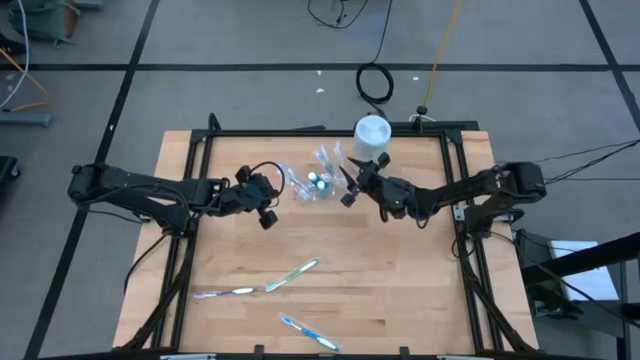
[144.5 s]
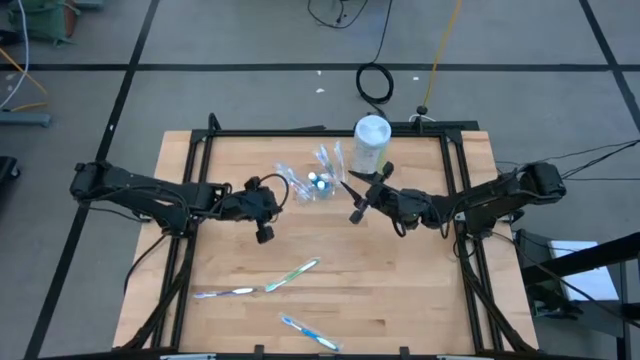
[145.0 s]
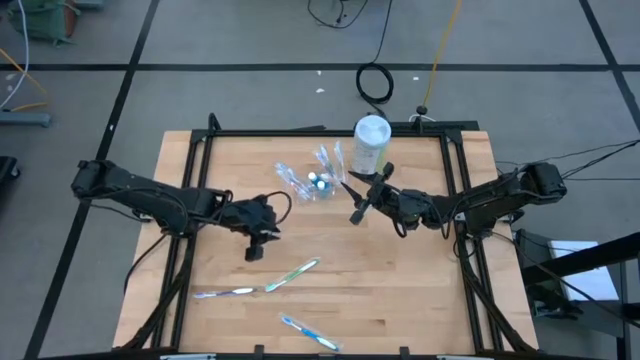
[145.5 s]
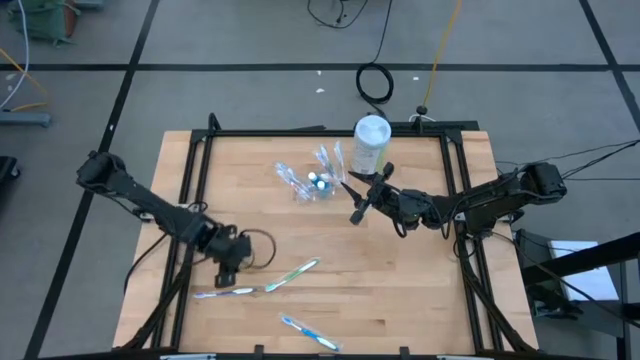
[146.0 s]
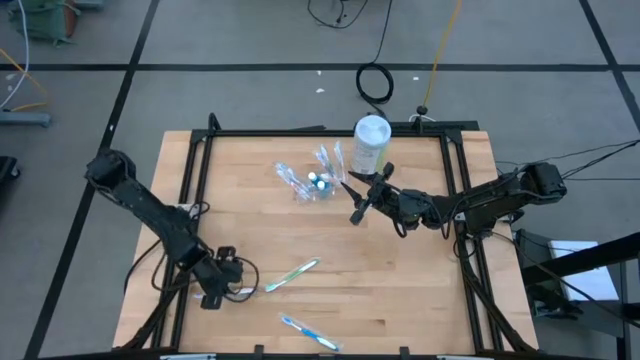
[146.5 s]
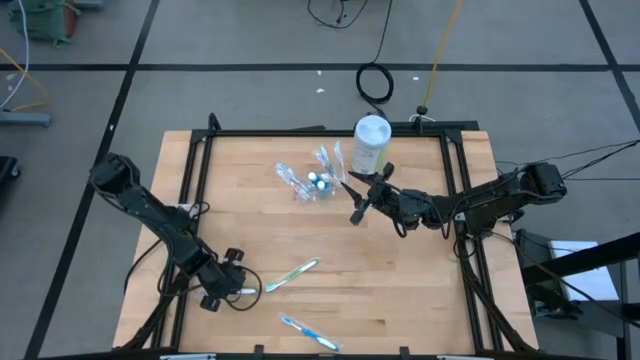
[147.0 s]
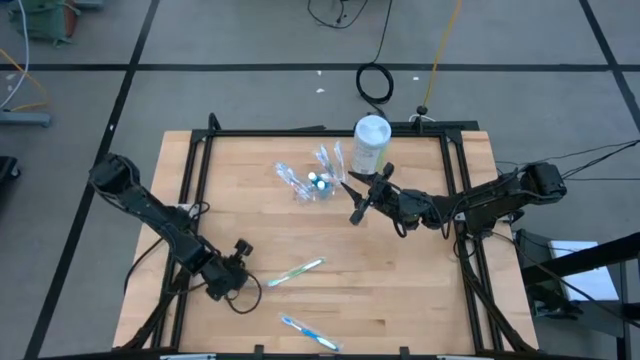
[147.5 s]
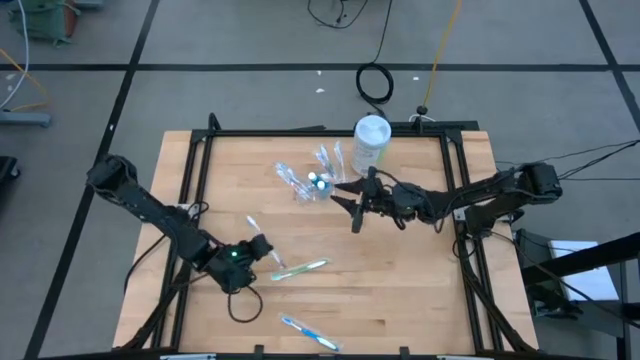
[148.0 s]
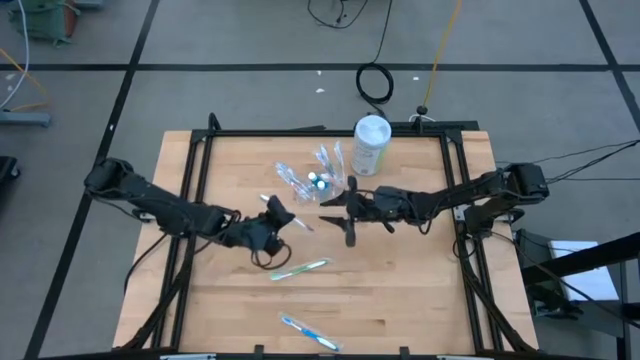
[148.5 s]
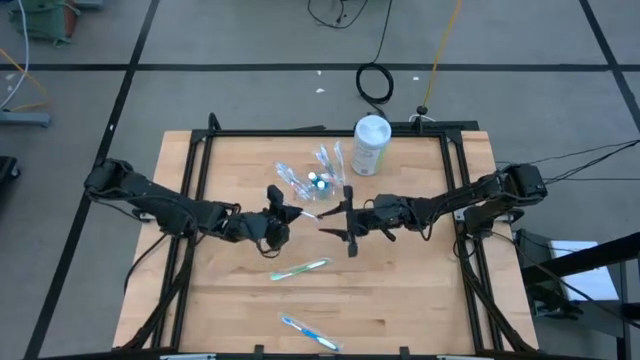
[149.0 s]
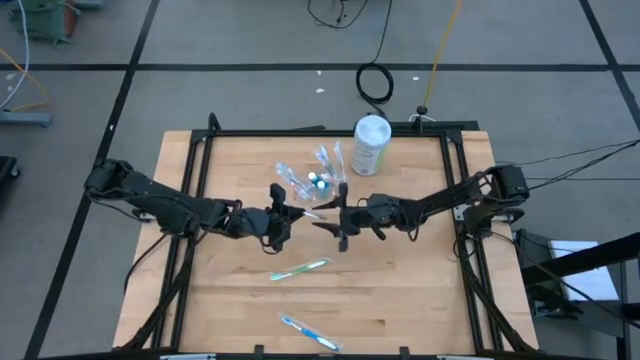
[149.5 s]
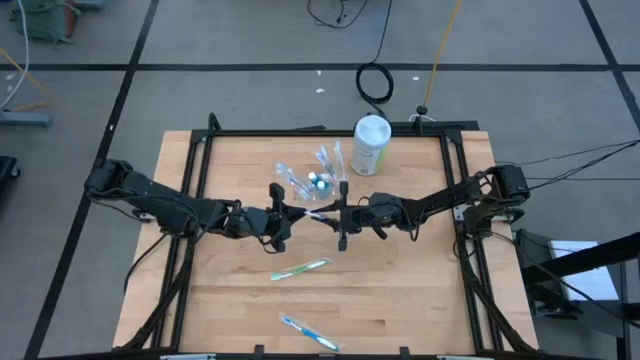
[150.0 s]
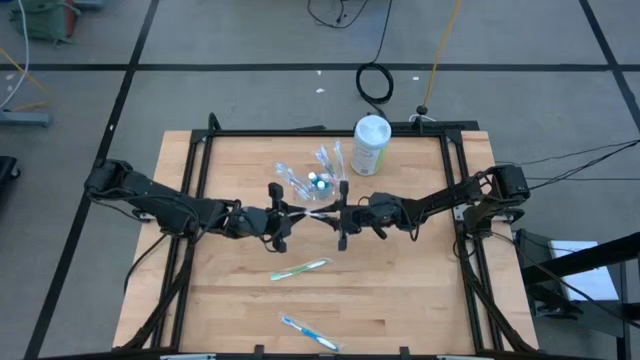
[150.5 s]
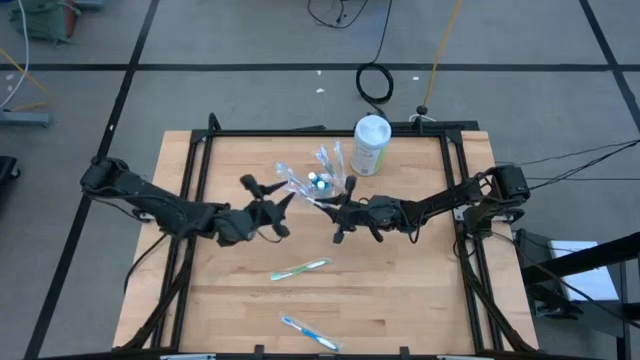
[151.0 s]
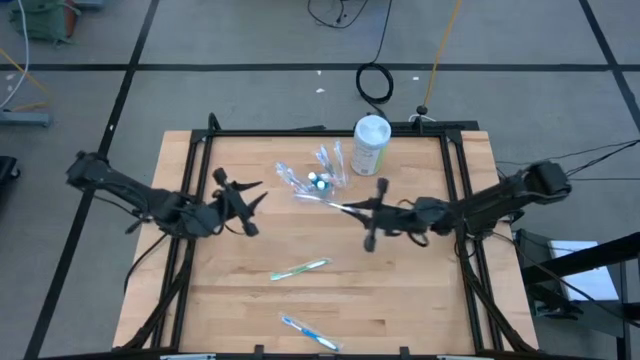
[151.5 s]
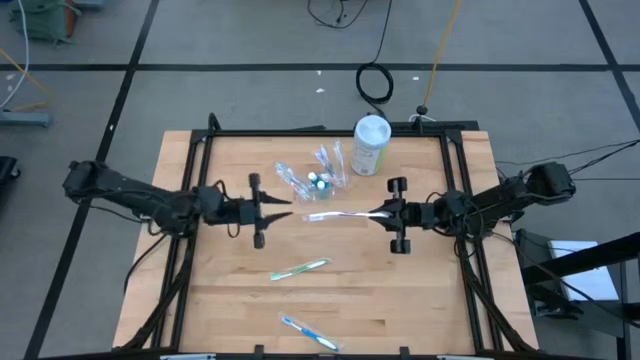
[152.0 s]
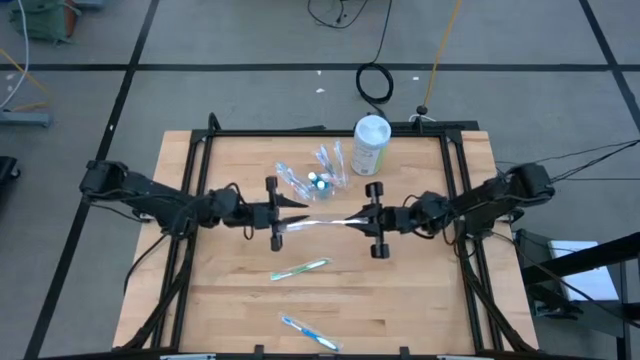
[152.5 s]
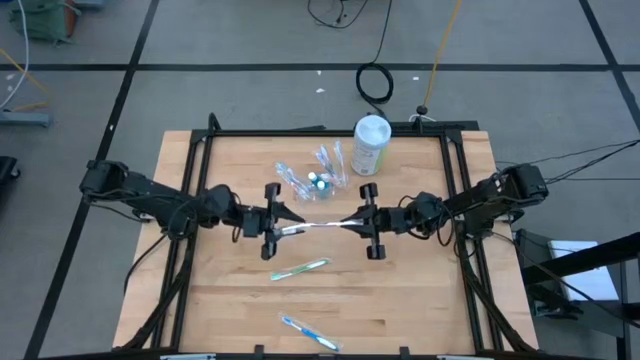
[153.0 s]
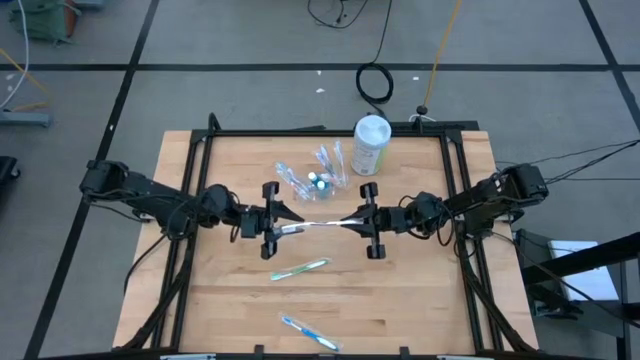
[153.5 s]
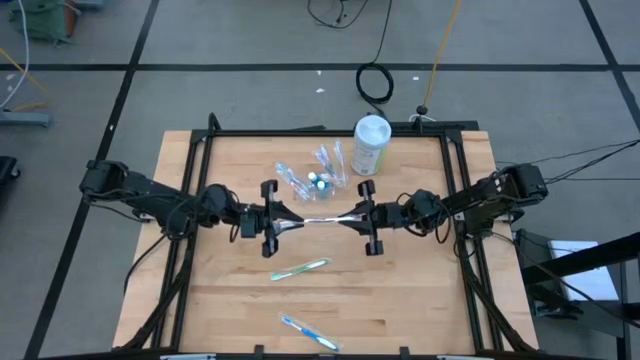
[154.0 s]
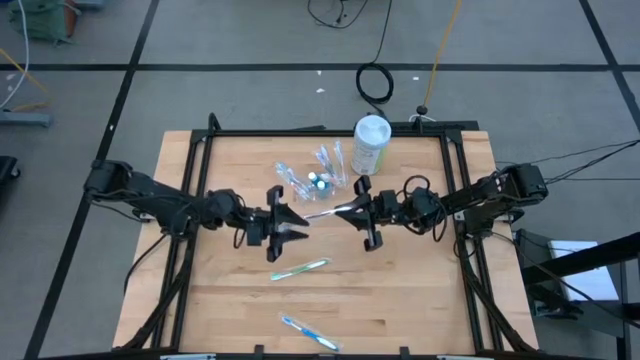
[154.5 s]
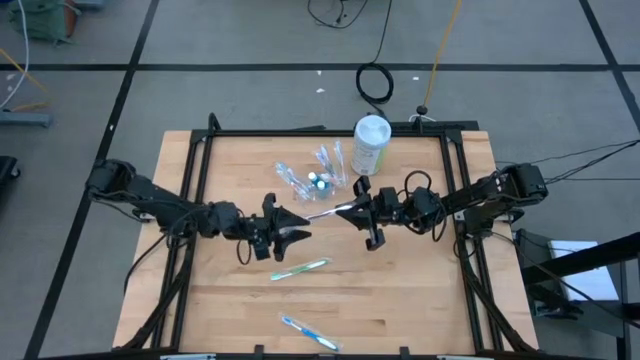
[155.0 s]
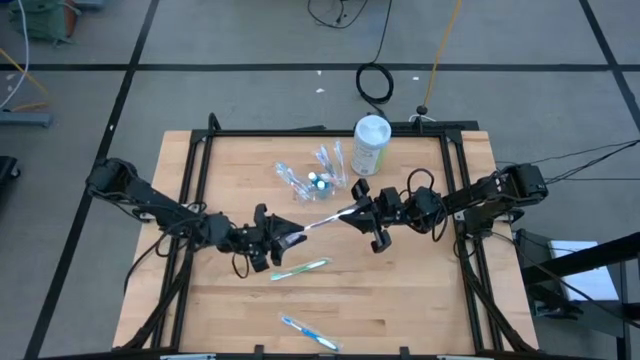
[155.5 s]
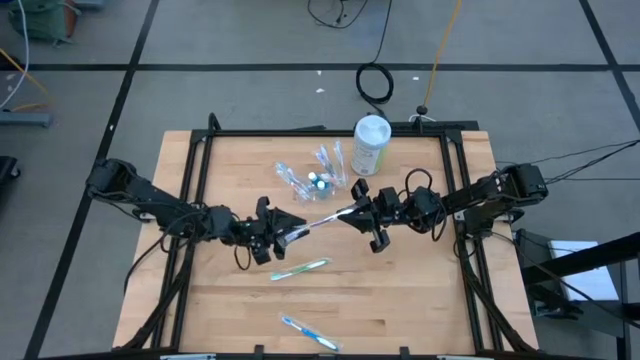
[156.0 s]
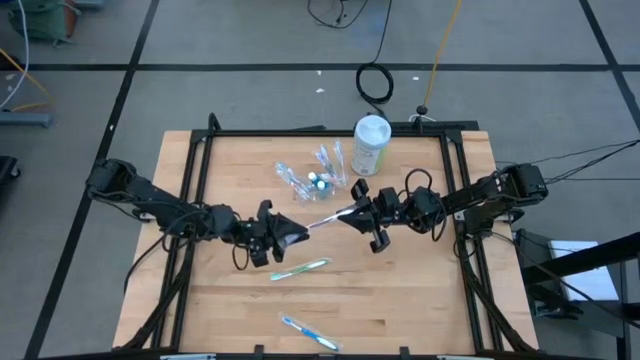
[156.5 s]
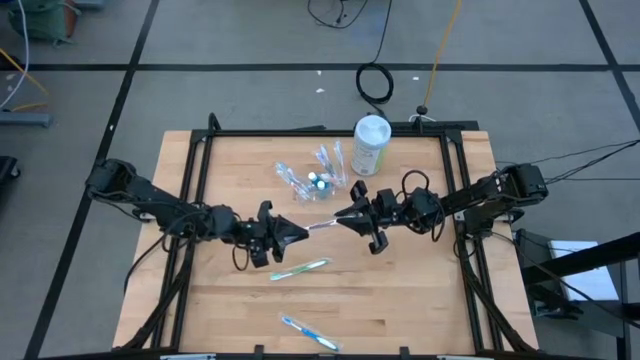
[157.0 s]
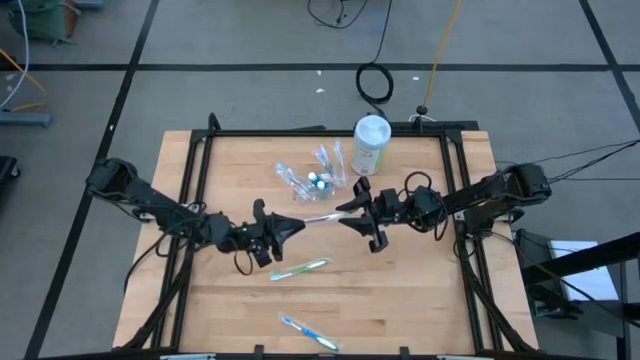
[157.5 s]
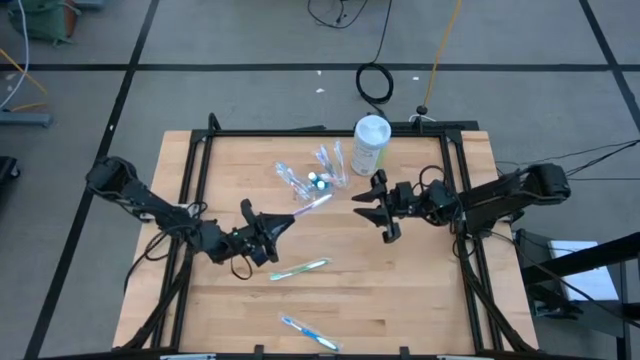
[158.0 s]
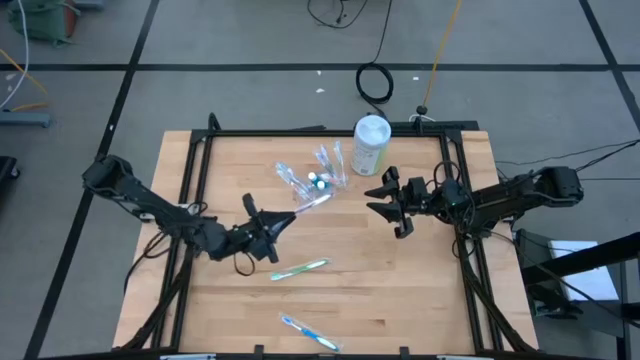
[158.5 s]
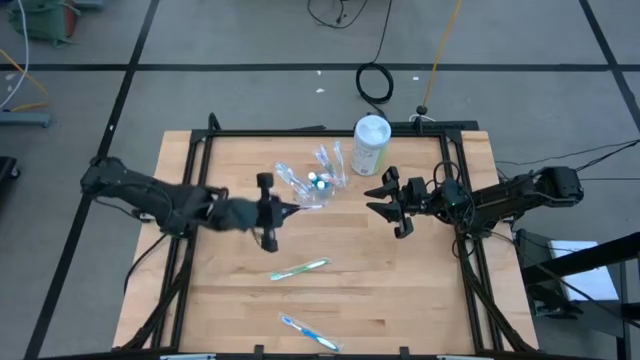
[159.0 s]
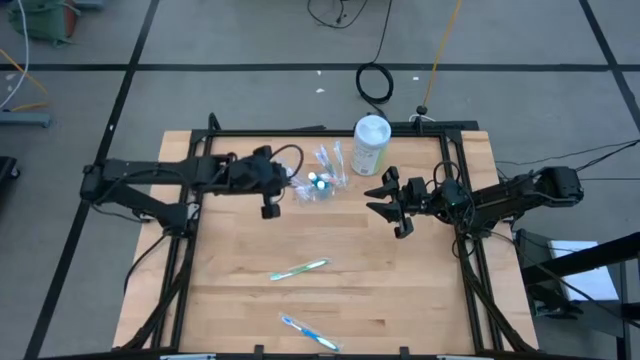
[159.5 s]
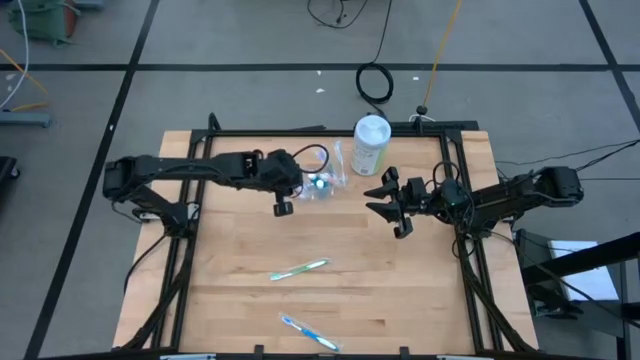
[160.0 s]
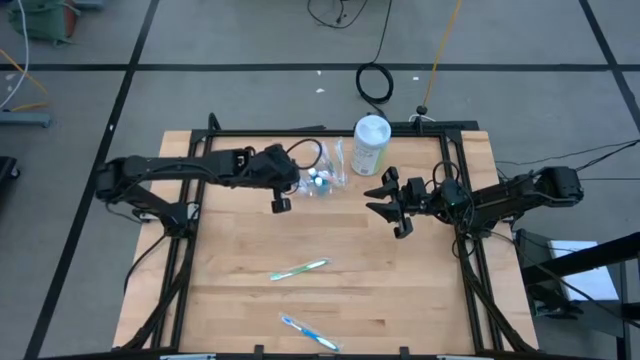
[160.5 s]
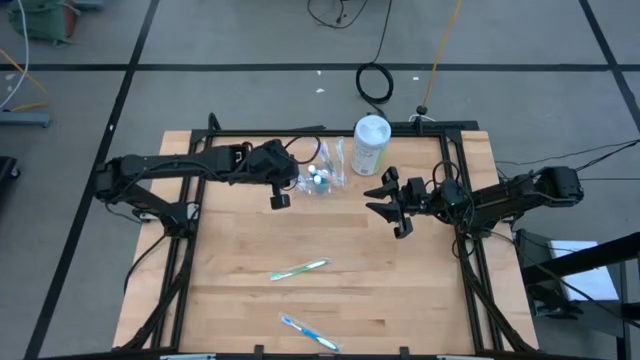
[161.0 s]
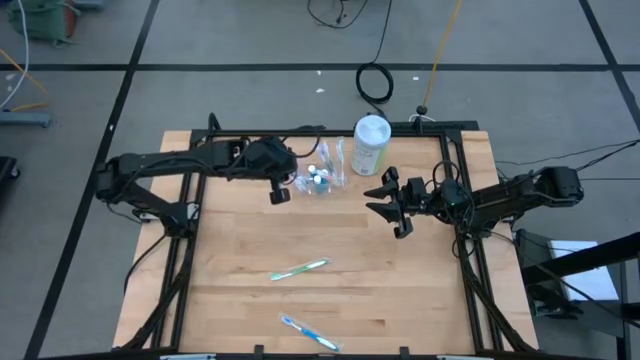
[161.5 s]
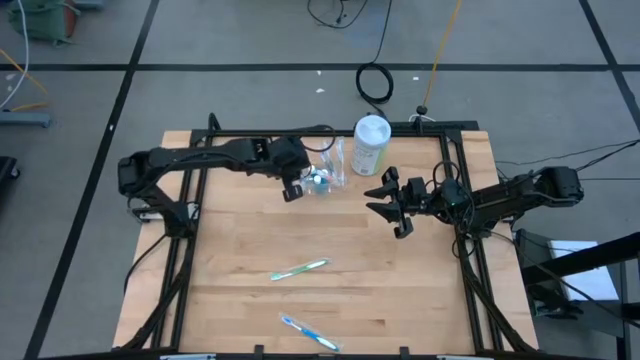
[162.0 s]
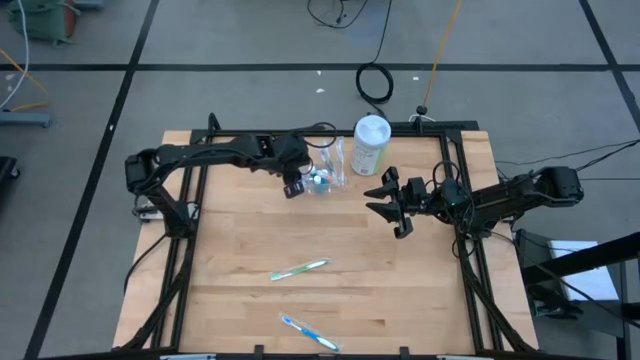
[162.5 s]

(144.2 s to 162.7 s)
Task: Pick & Place toothbrushing station
Put the violet toothbrush into the transparent organizer

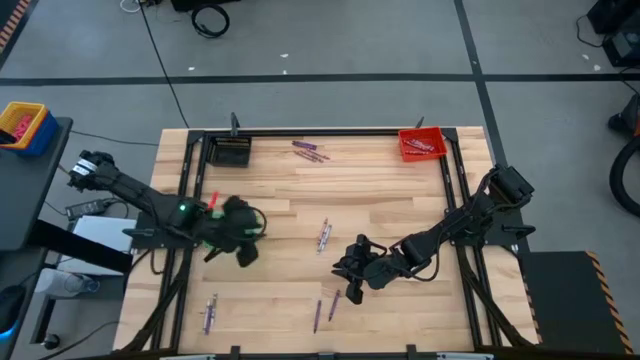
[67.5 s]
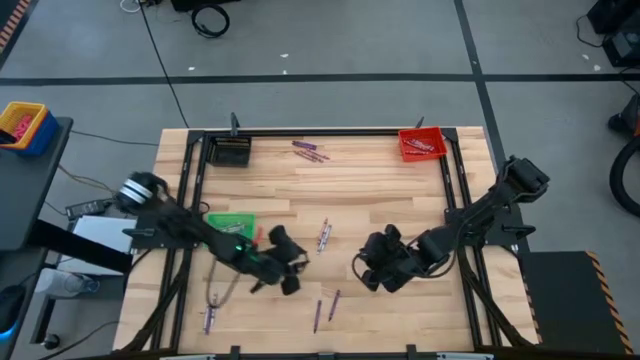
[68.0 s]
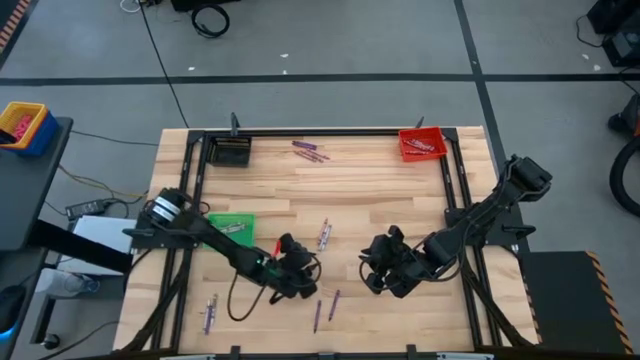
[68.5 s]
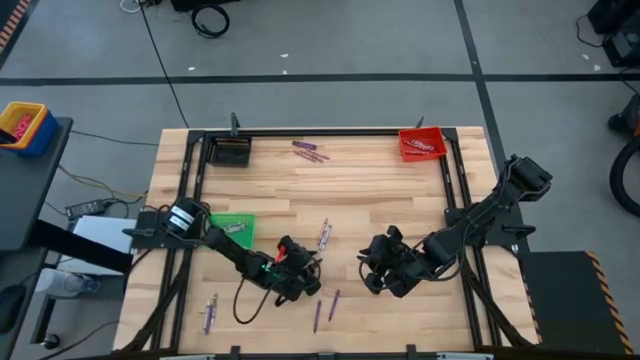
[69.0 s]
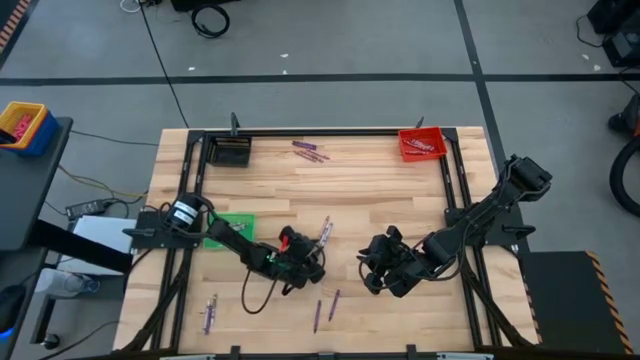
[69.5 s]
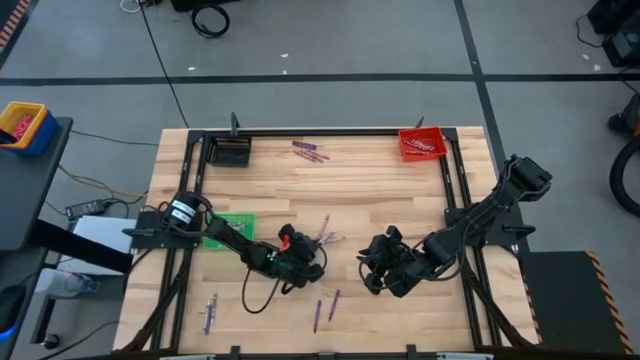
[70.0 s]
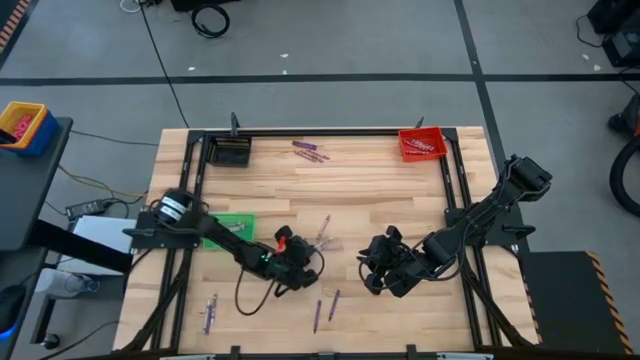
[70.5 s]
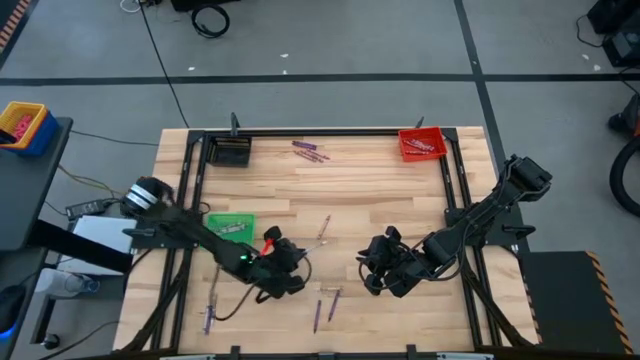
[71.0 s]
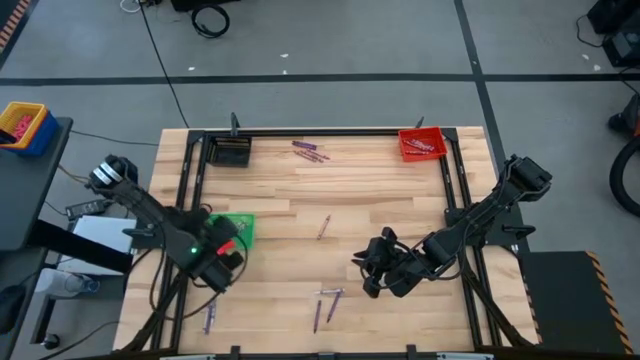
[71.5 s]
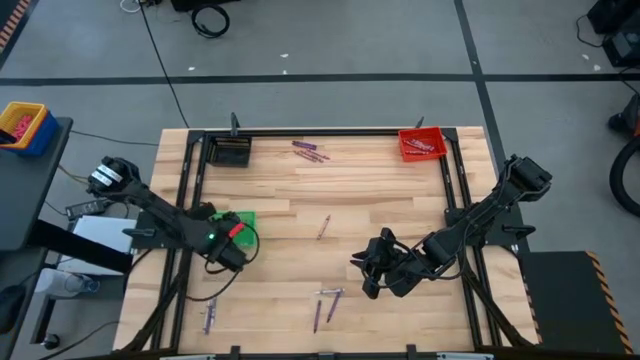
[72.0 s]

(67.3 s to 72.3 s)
Task: Sort crayons
Put the white crayon into the green bin
